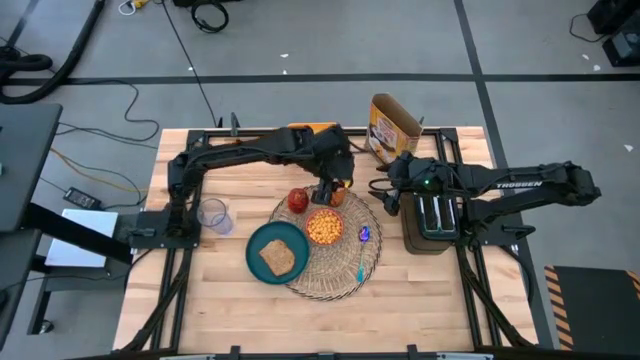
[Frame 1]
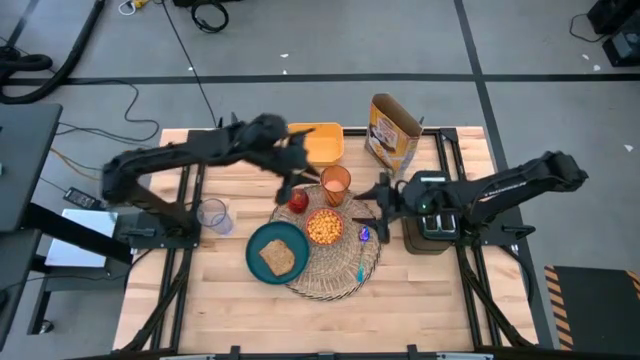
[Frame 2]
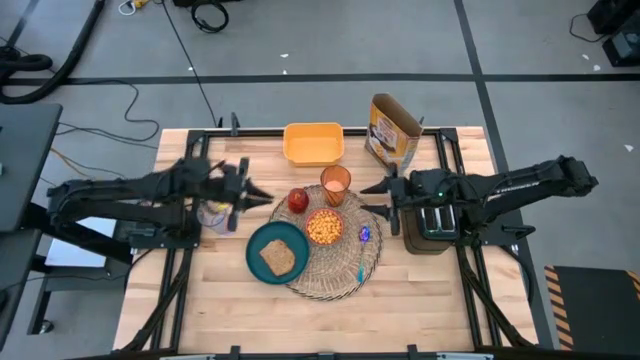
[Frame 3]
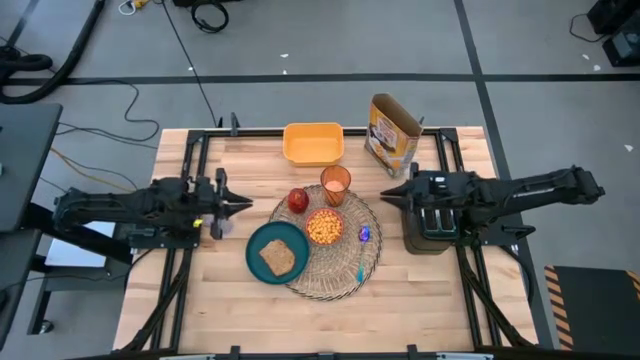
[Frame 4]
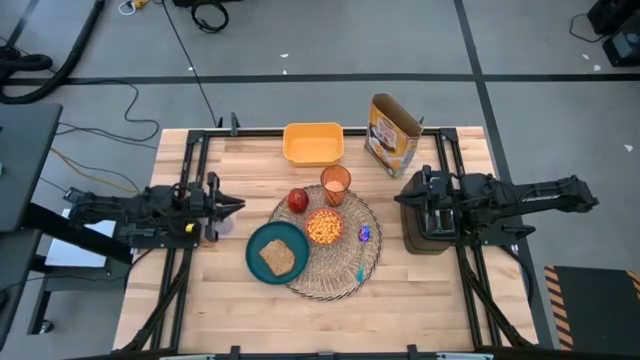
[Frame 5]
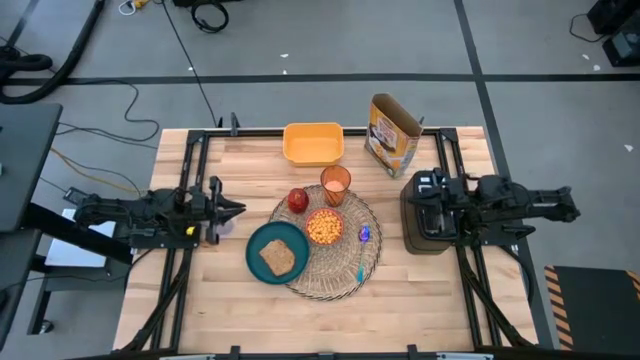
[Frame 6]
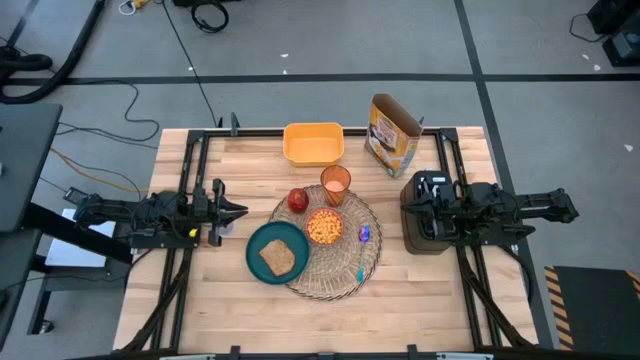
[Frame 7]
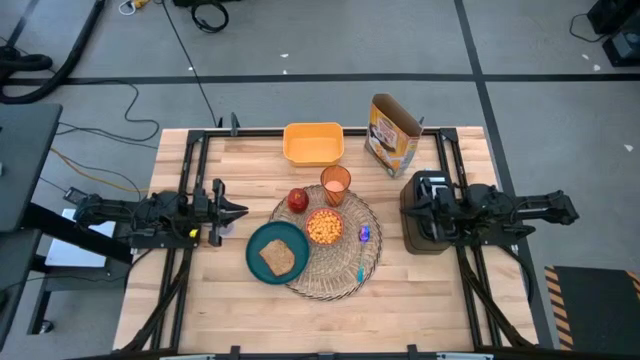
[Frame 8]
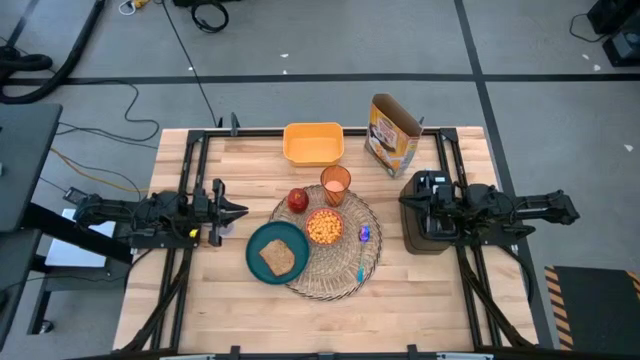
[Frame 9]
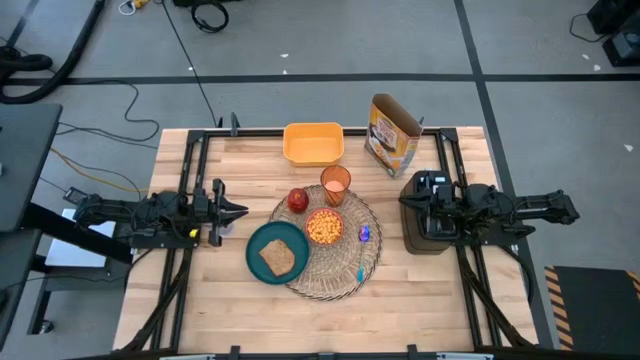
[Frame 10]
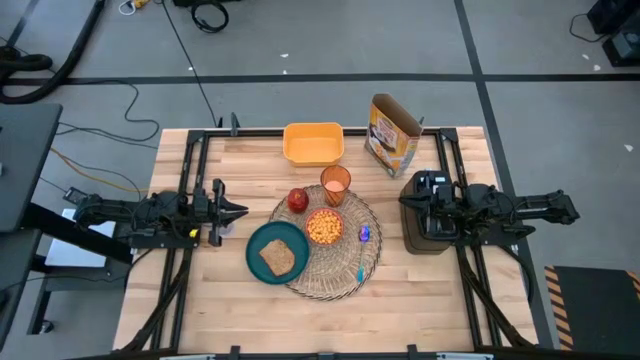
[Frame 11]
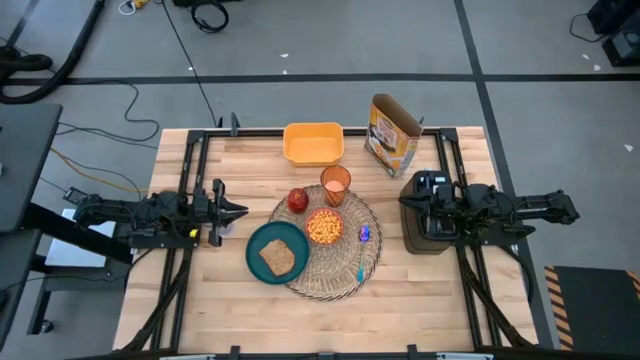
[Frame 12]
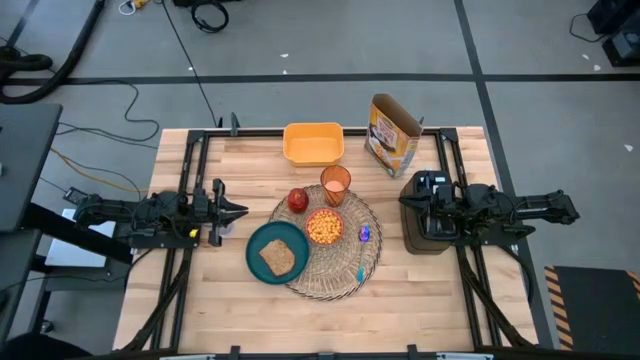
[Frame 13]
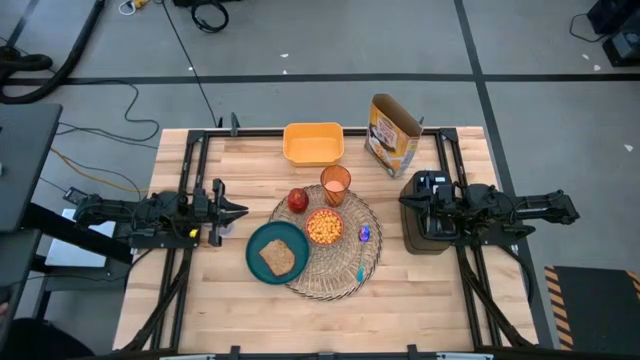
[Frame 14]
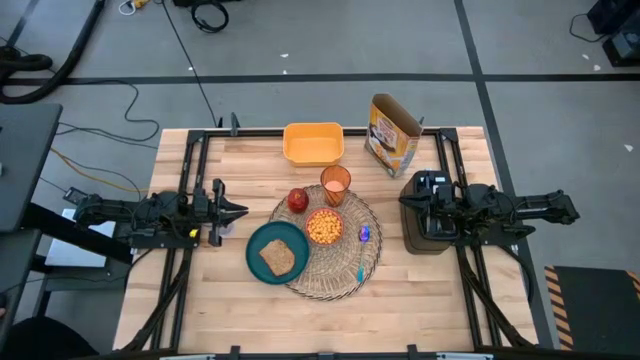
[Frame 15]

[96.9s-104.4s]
Task: Arrange a breakfast setting
Return to Home Position

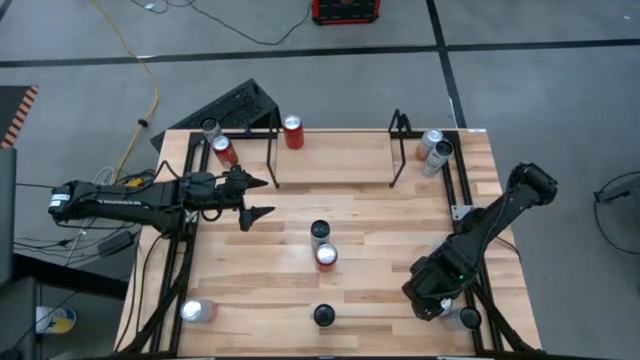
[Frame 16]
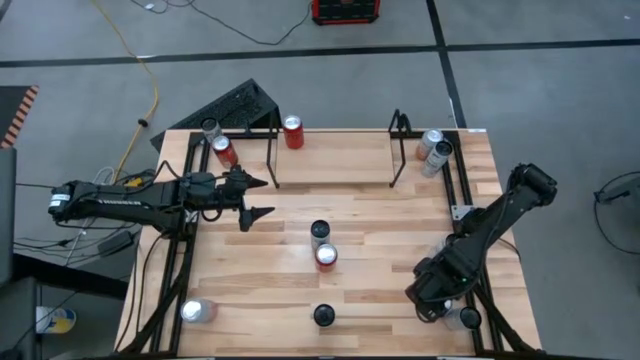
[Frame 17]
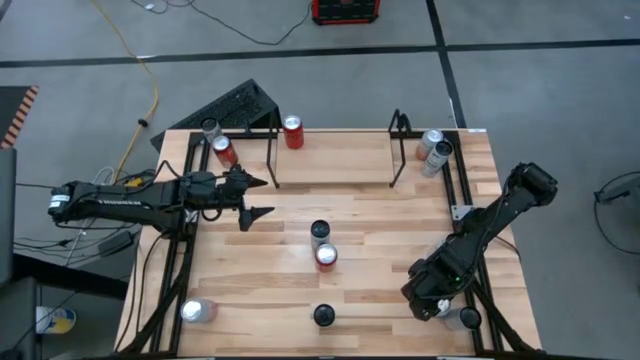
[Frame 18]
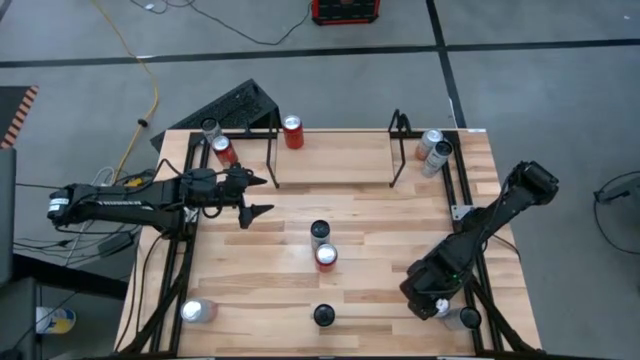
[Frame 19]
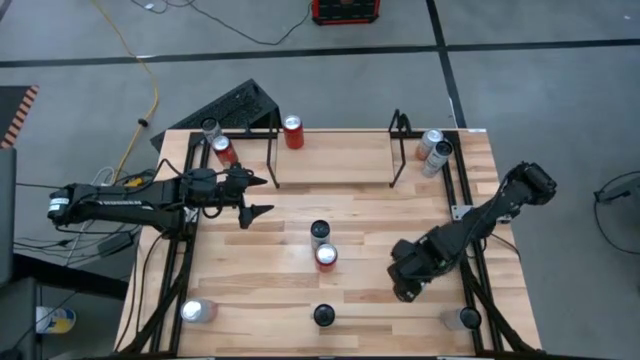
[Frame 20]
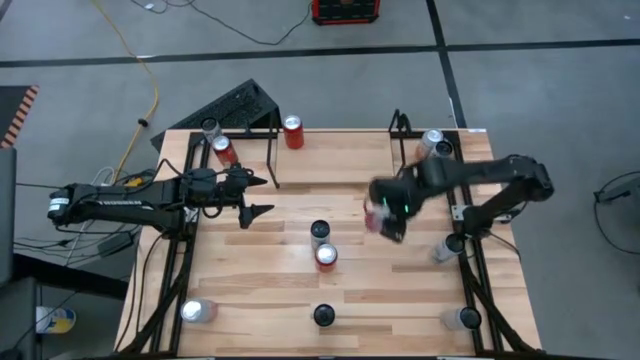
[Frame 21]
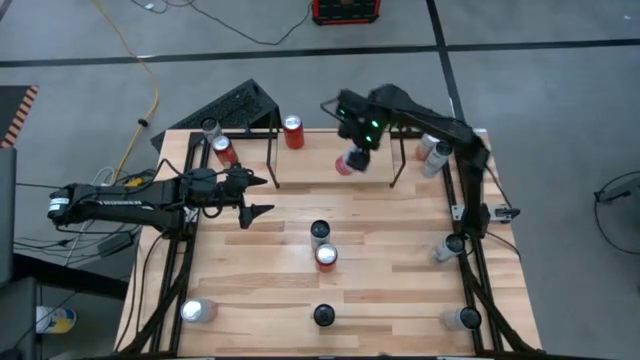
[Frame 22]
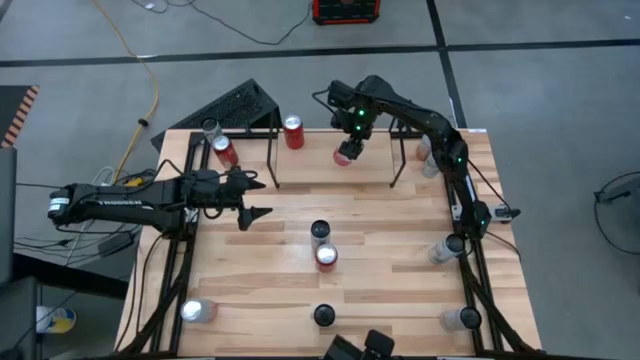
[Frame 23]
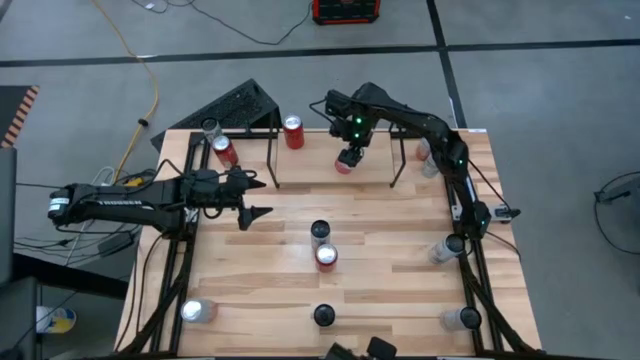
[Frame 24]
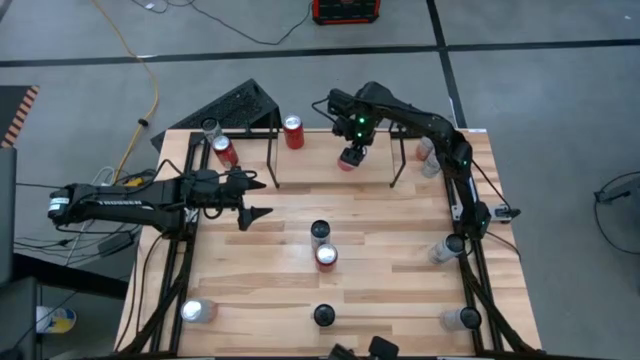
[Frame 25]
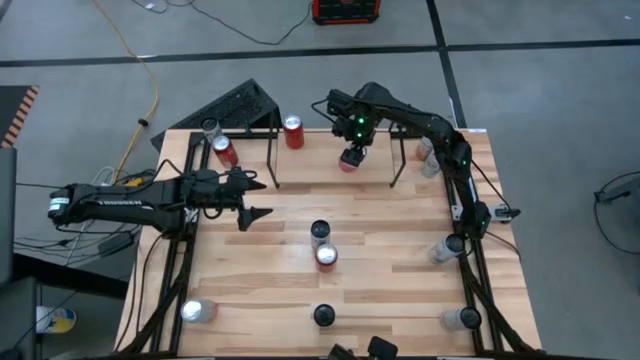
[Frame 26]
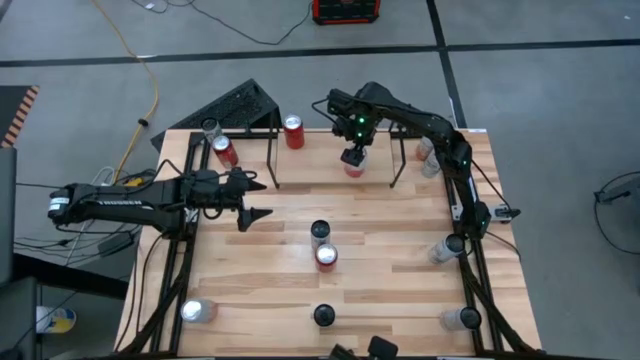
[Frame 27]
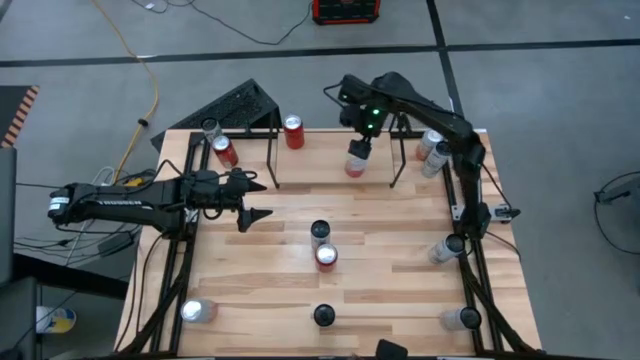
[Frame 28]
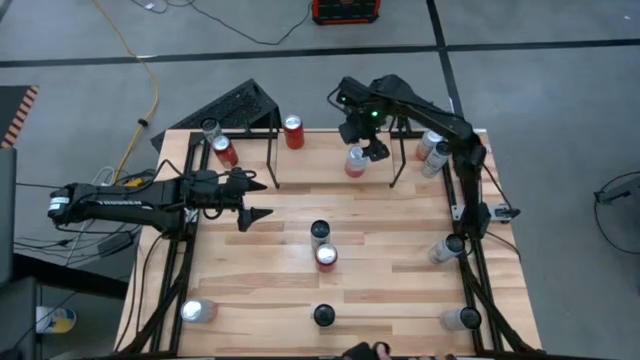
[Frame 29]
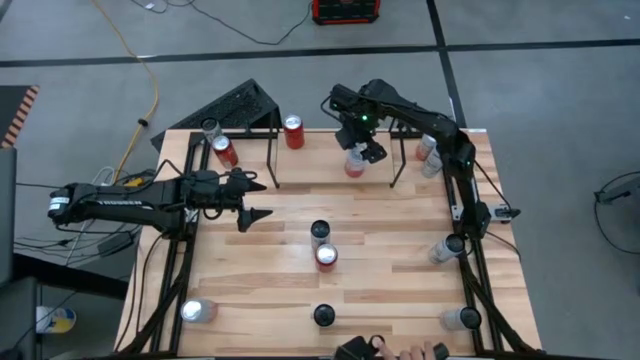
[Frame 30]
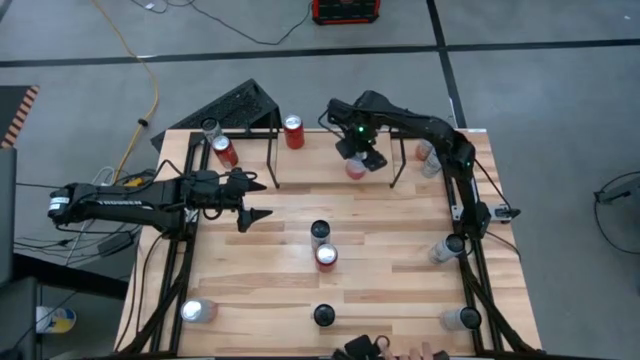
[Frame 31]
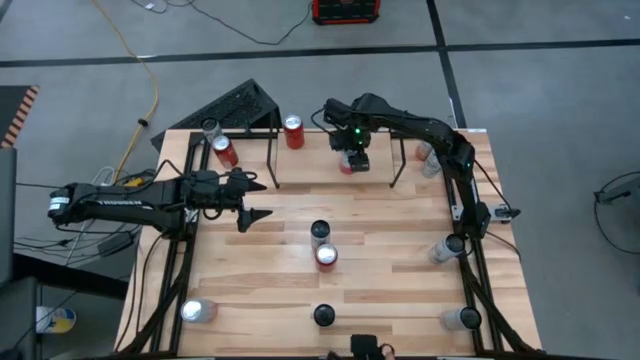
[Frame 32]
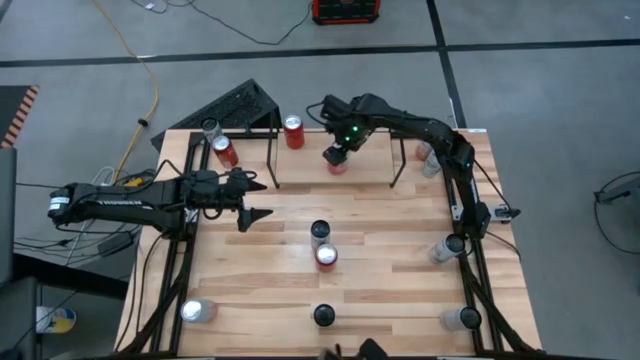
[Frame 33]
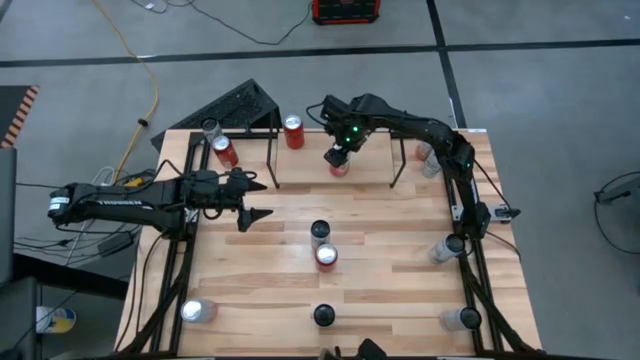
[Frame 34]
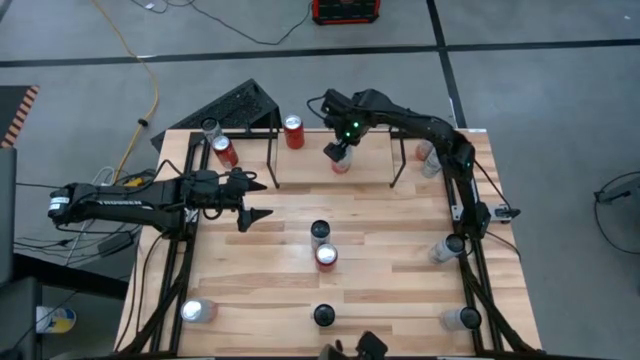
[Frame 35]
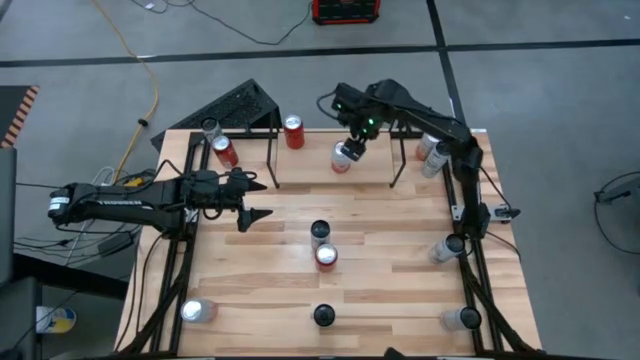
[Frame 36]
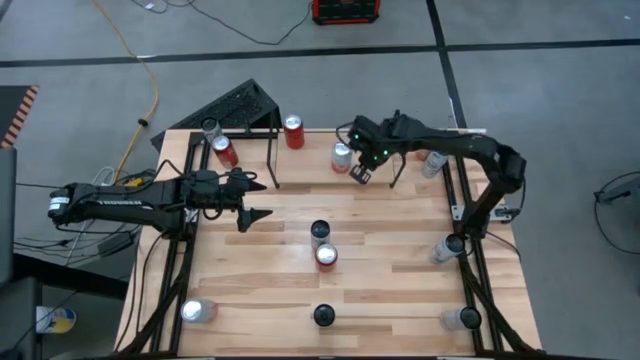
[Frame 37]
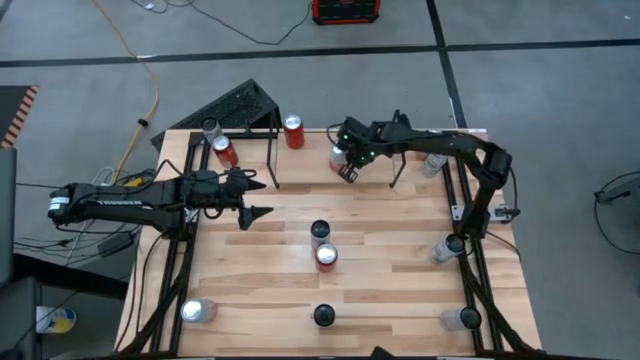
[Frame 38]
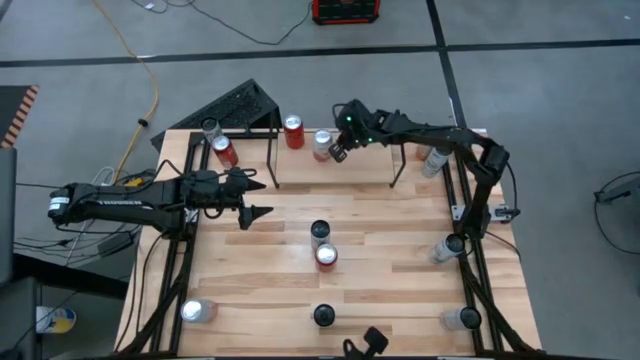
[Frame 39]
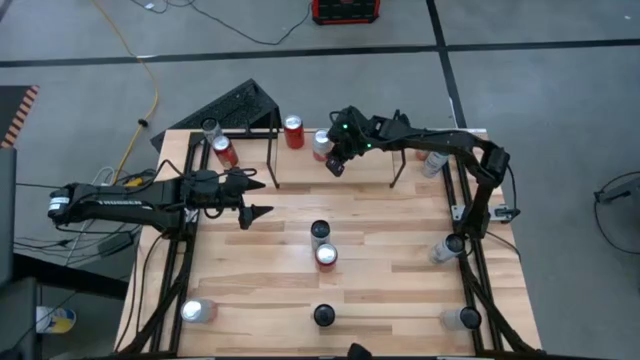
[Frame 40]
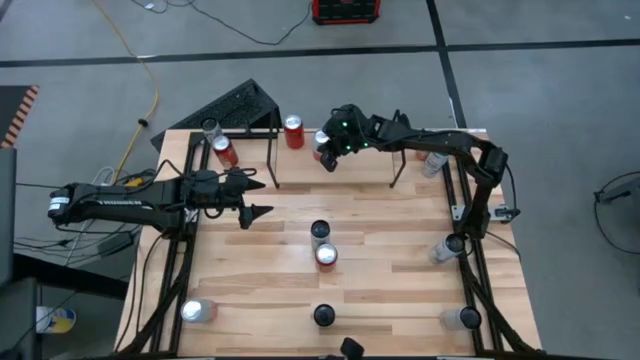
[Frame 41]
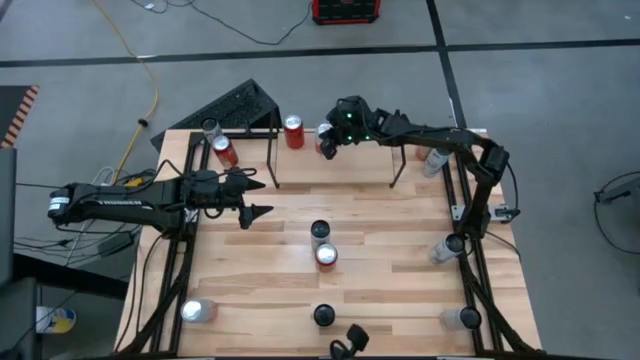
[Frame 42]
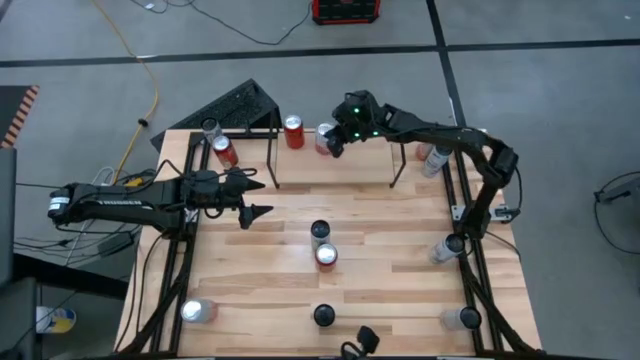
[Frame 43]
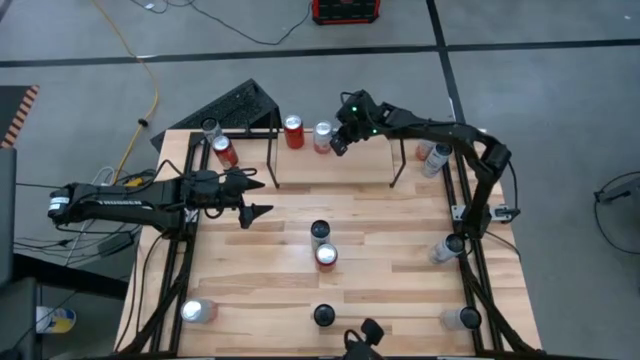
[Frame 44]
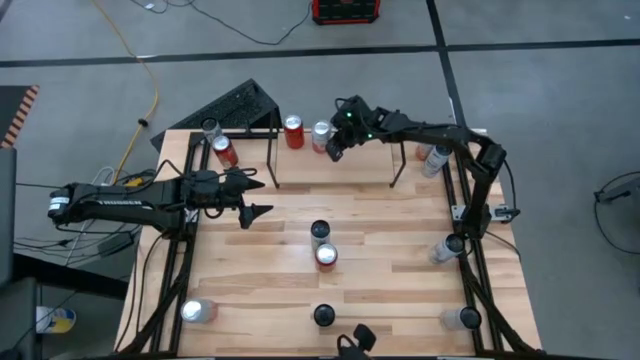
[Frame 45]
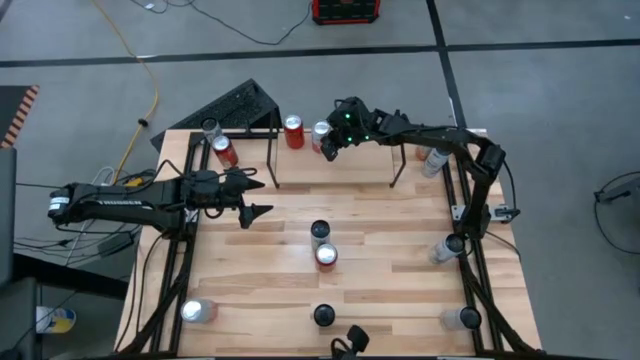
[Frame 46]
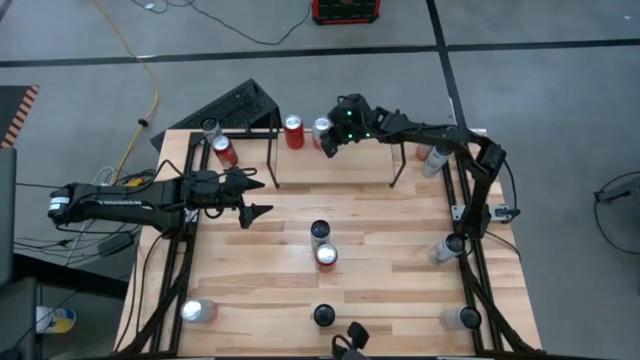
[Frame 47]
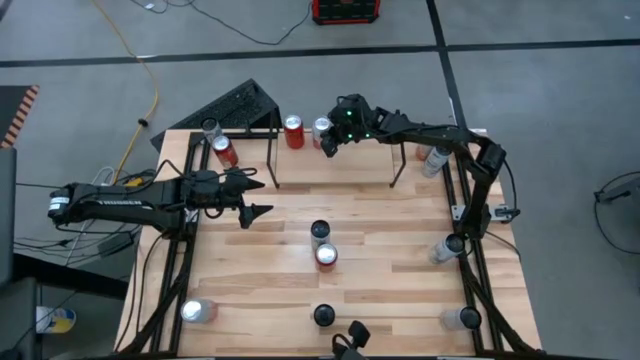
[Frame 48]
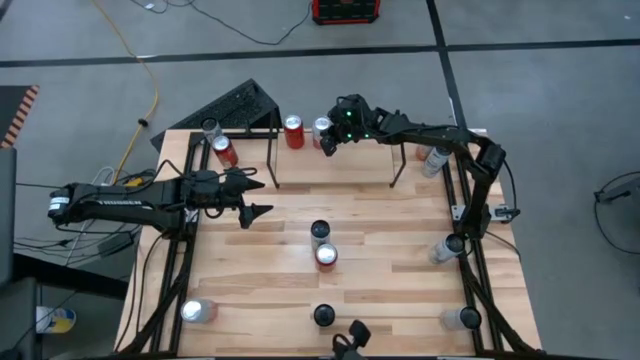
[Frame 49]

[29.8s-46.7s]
Task: Place canned beverage on shelf
Put the pink white soda can on the shelf
